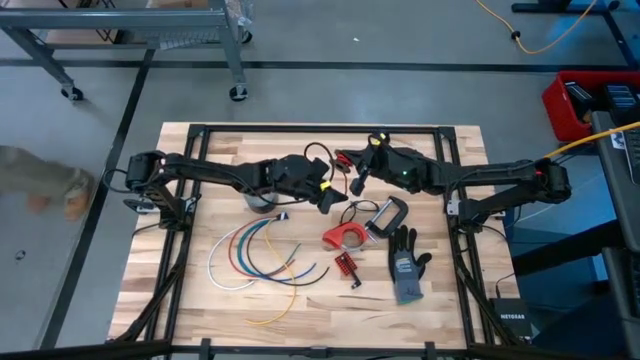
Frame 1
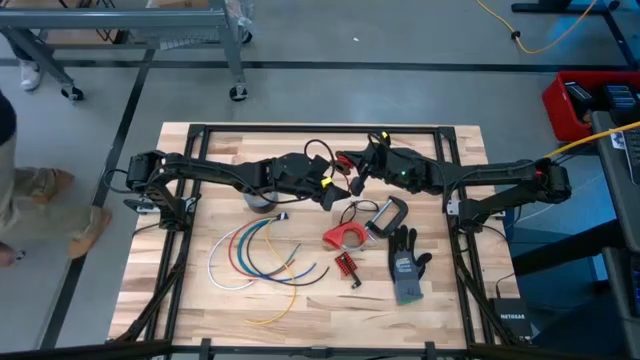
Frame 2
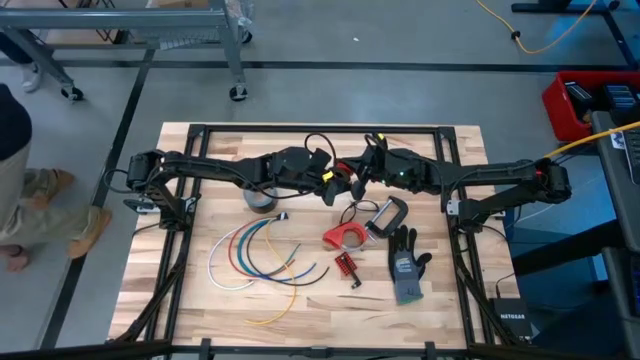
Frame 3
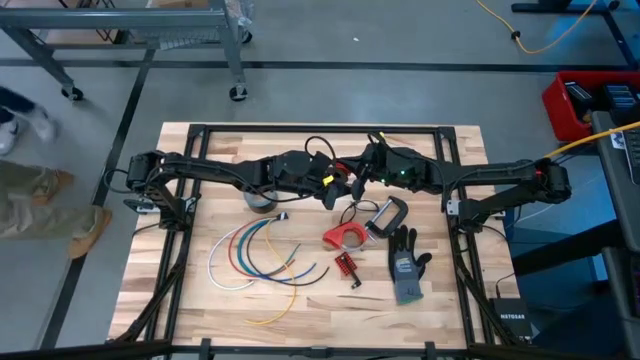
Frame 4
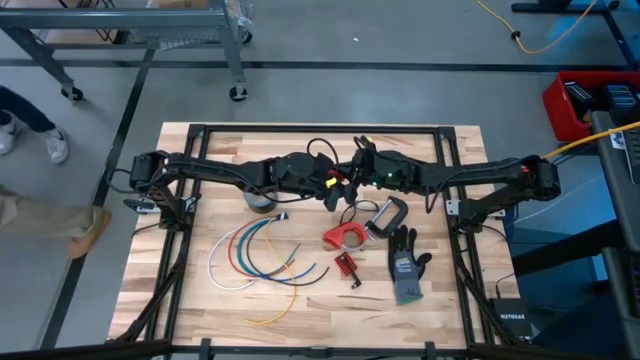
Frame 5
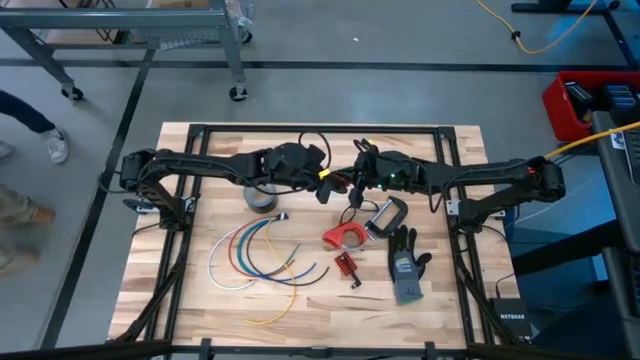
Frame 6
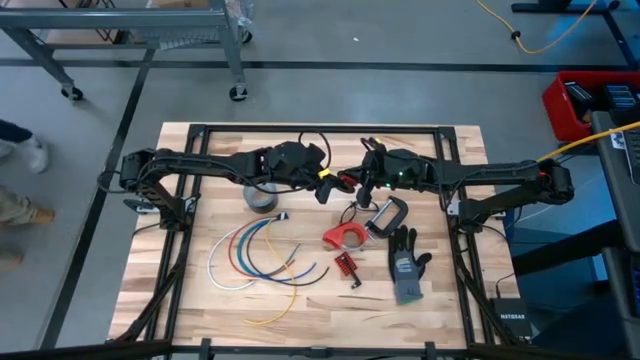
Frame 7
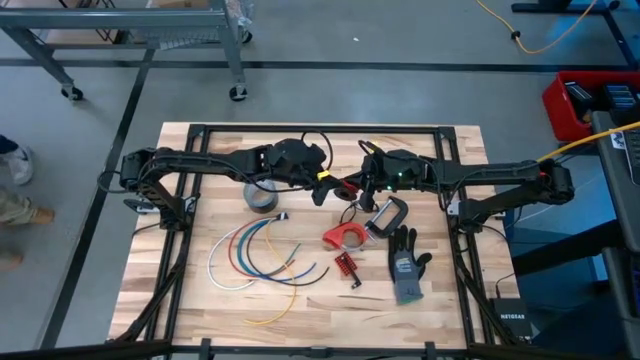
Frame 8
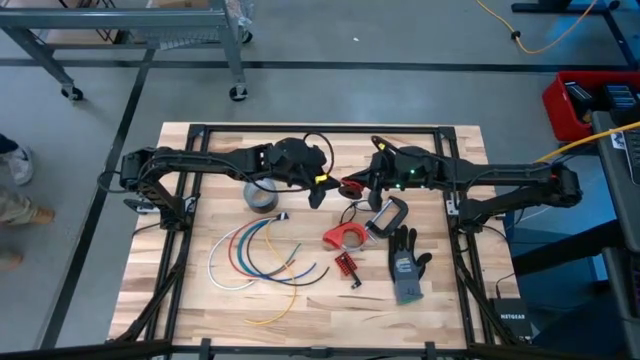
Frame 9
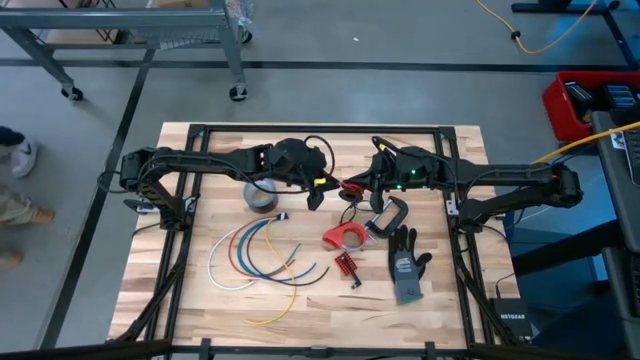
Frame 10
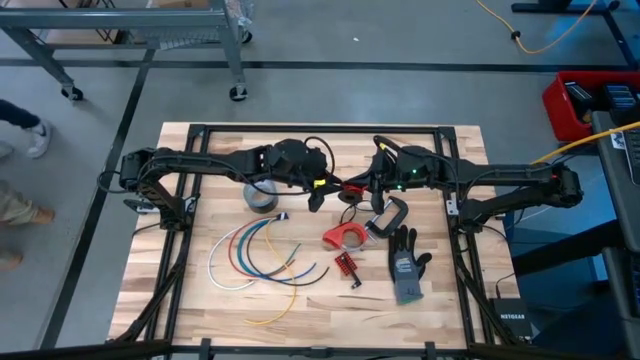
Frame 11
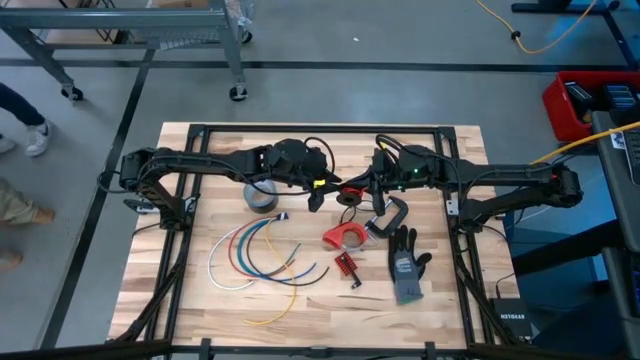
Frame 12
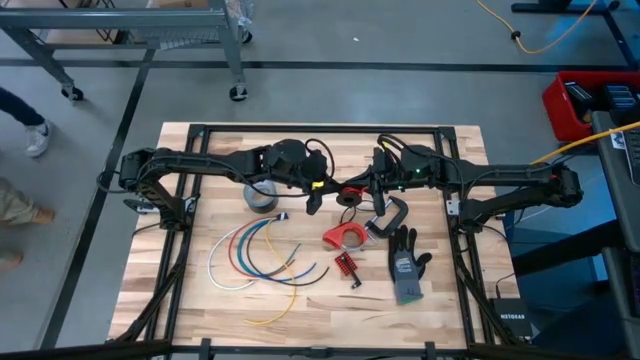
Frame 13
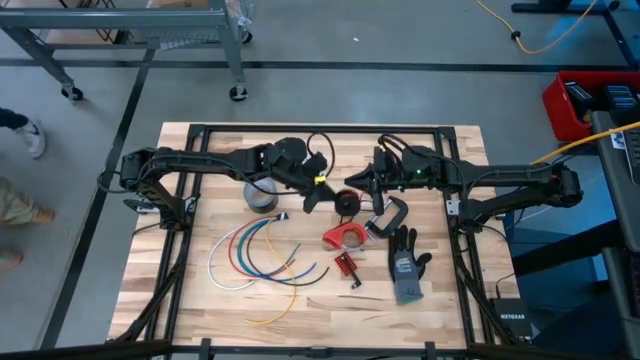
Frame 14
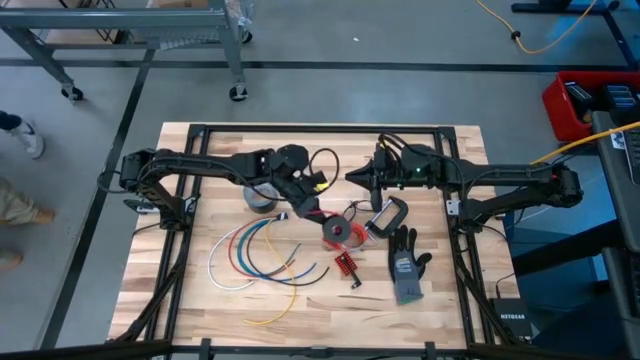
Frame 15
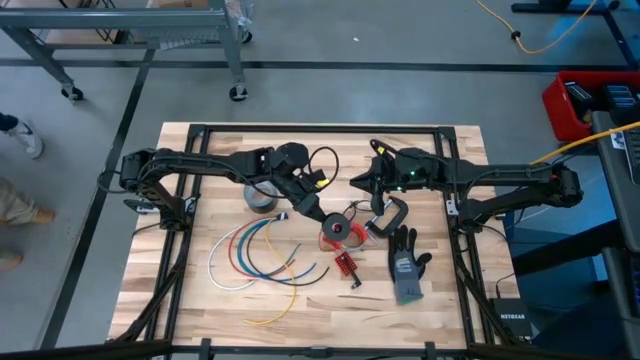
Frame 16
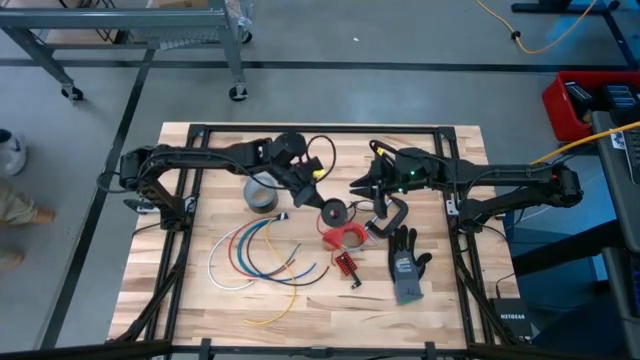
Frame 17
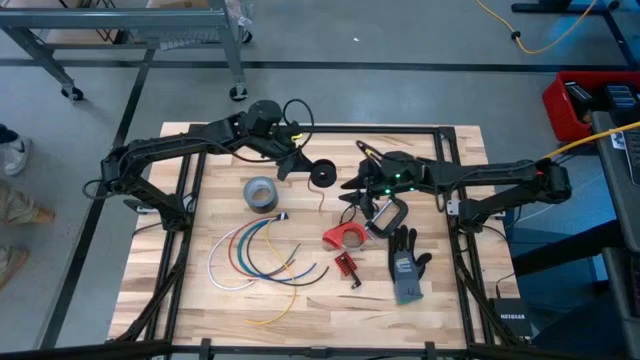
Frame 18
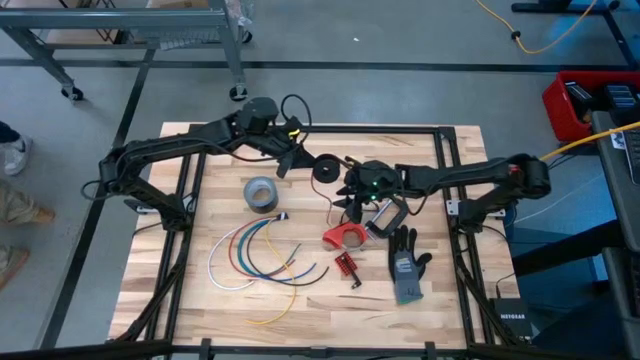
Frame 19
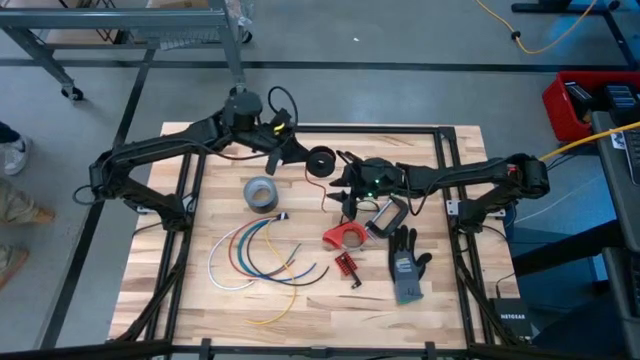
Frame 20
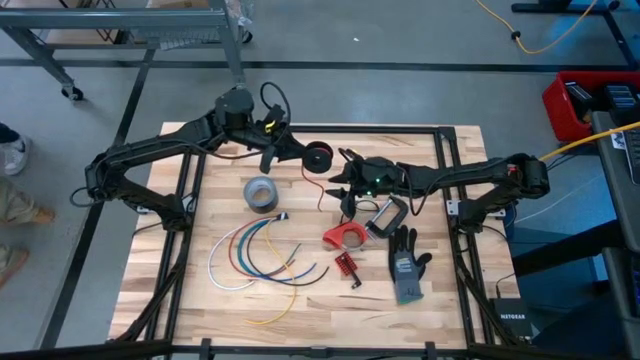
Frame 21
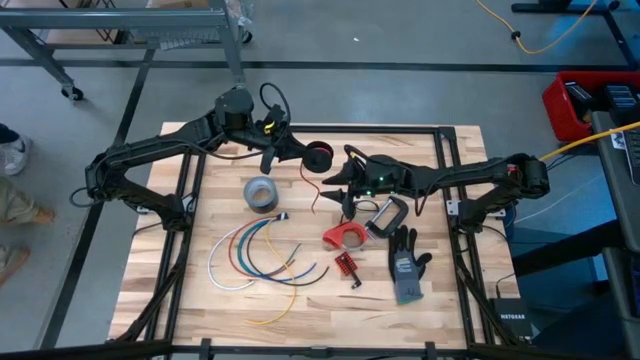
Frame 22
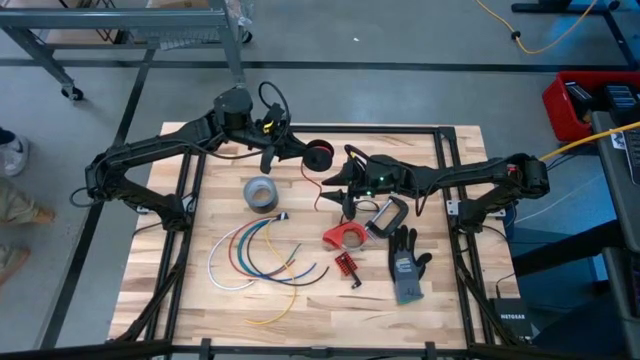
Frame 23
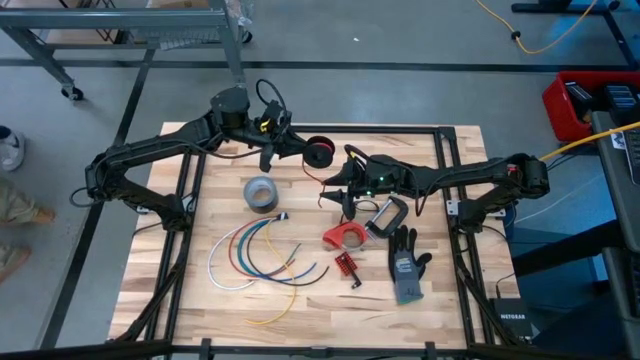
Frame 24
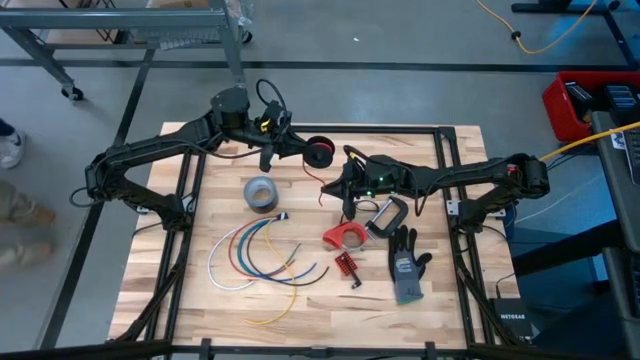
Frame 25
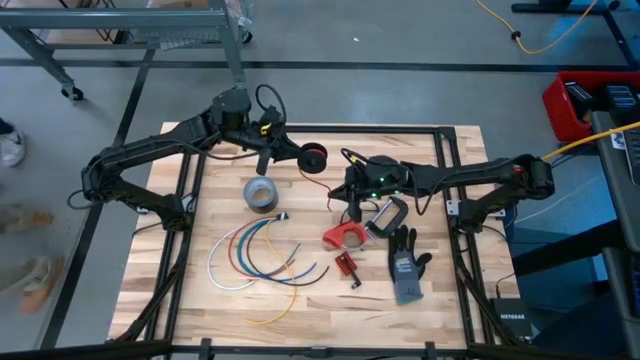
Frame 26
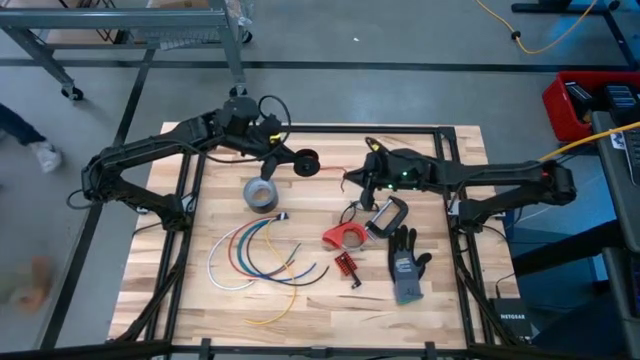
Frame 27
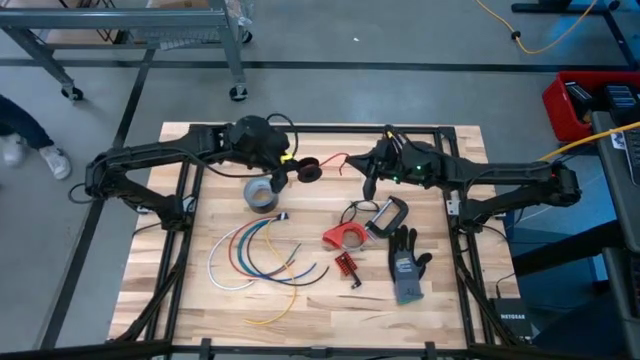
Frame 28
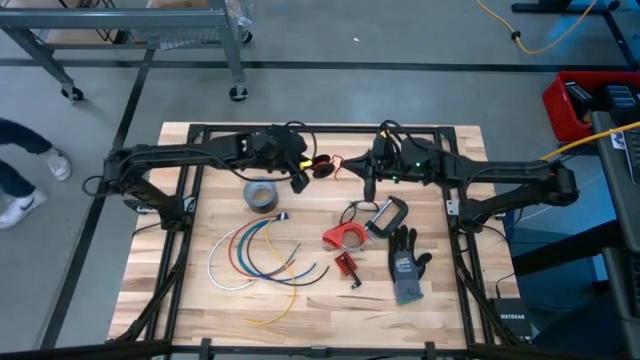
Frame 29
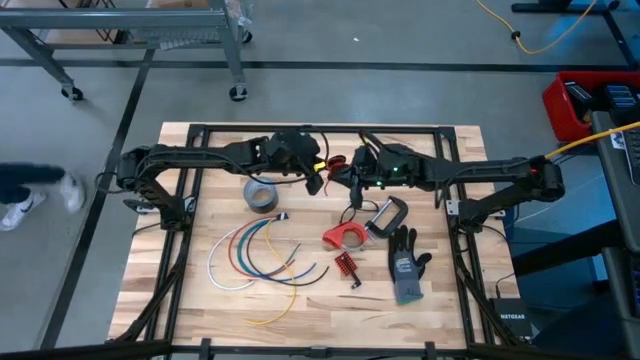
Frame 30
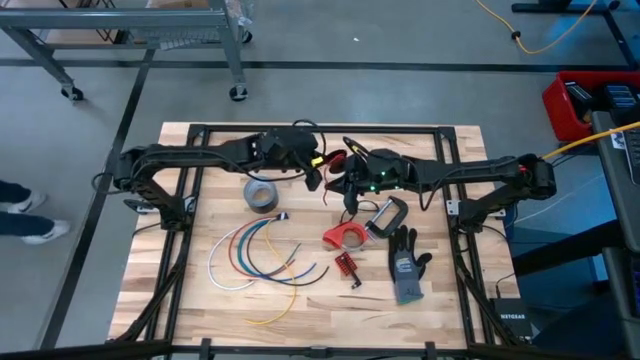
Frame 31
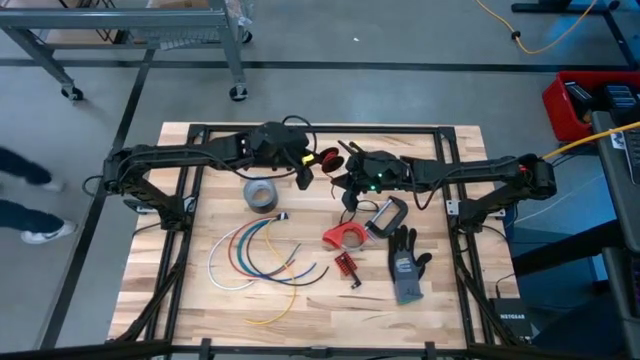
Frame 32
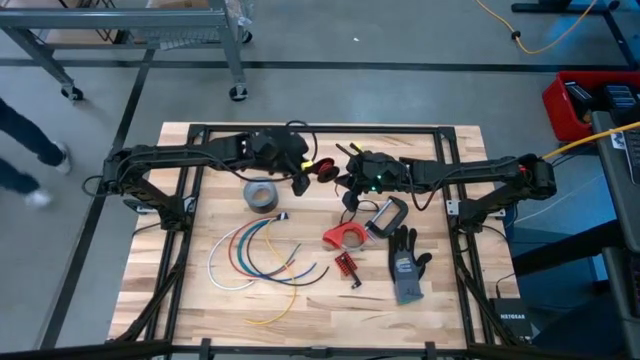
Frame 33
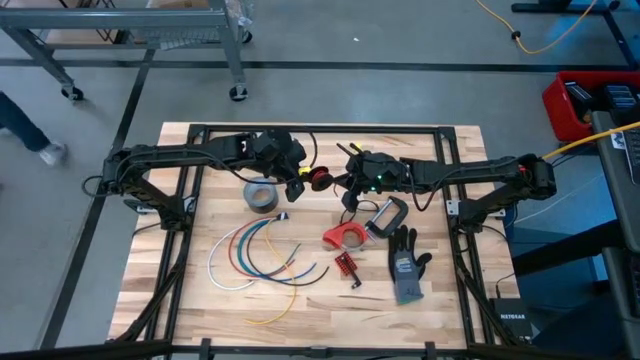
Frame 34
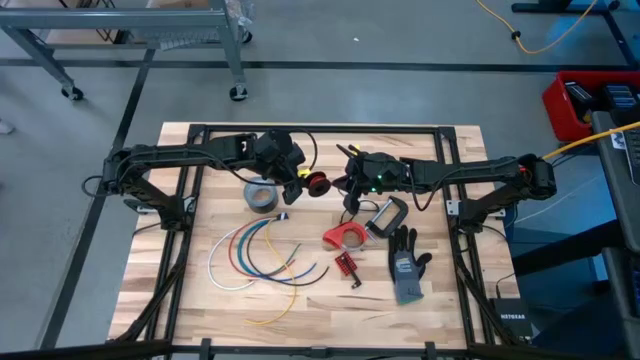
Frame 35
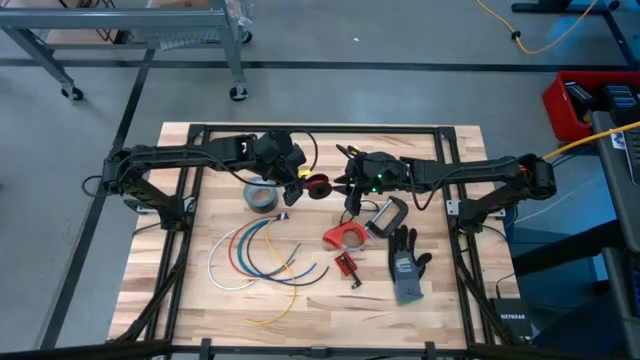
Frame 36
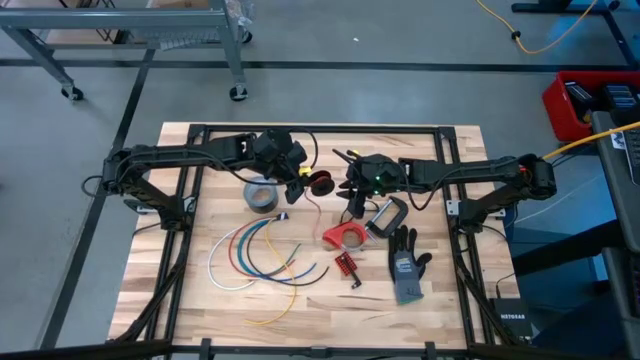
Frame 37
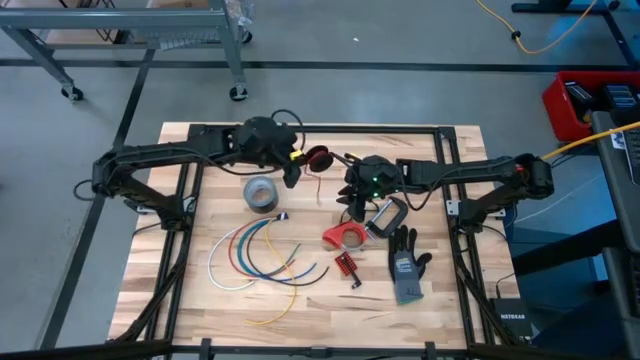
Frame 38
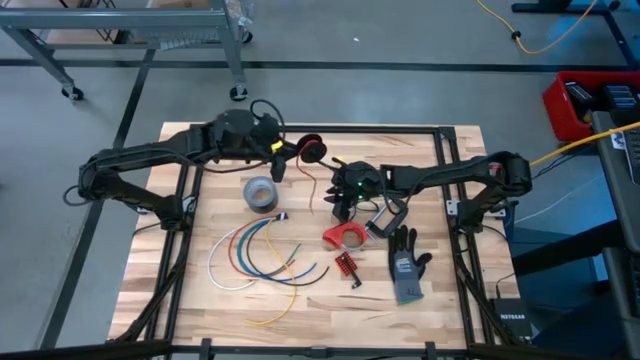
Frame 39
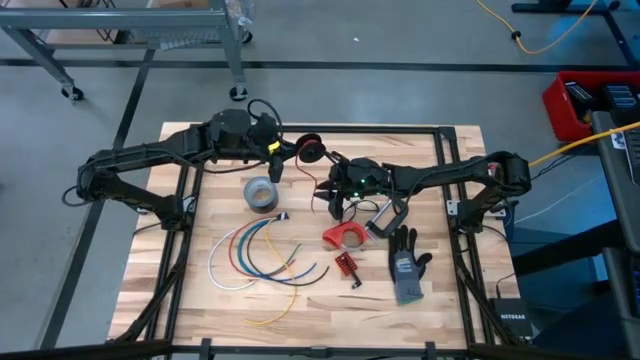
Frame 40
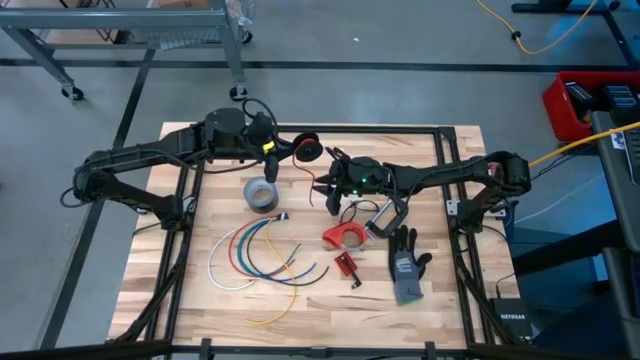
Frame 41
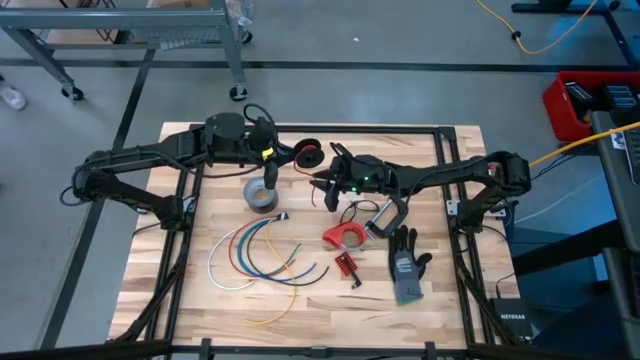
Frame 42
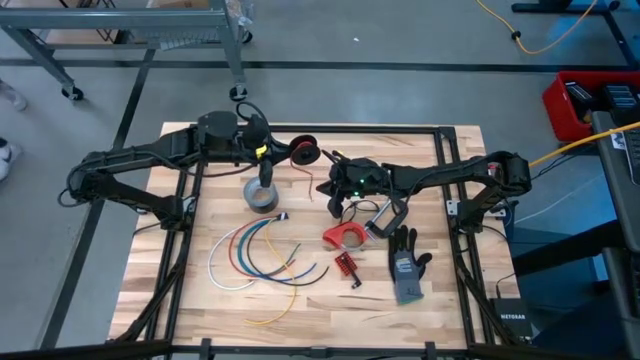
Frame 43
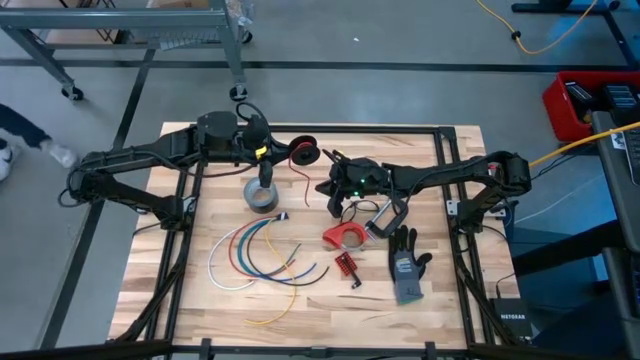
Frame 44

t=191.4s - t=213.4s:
Task: Coil cords
Coil the red wire onto the spool
